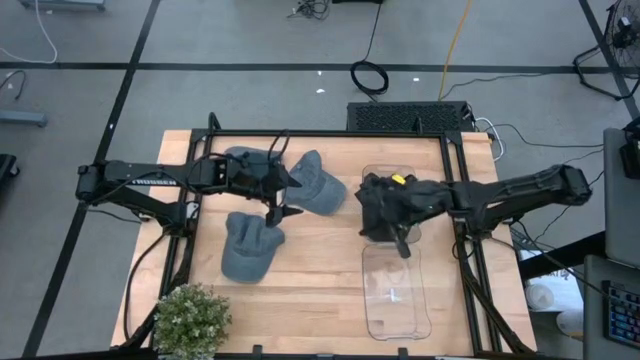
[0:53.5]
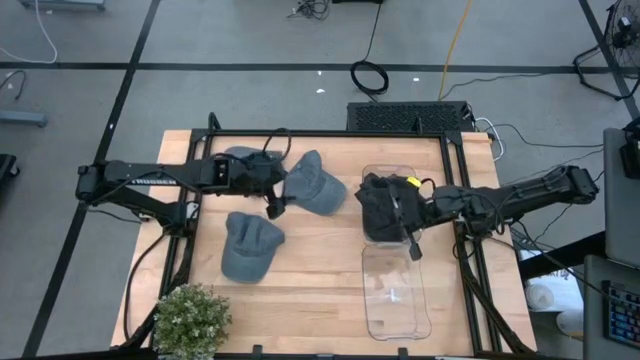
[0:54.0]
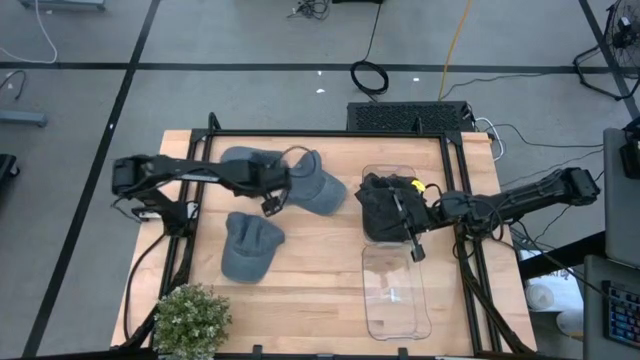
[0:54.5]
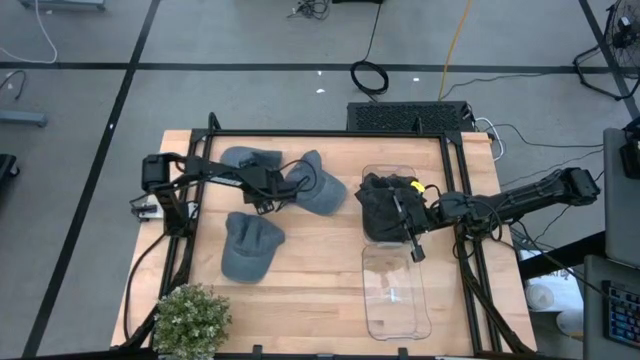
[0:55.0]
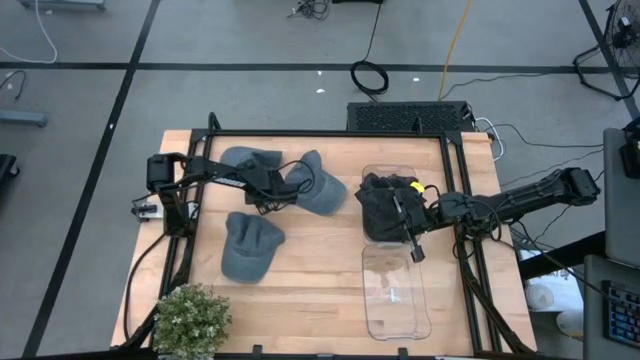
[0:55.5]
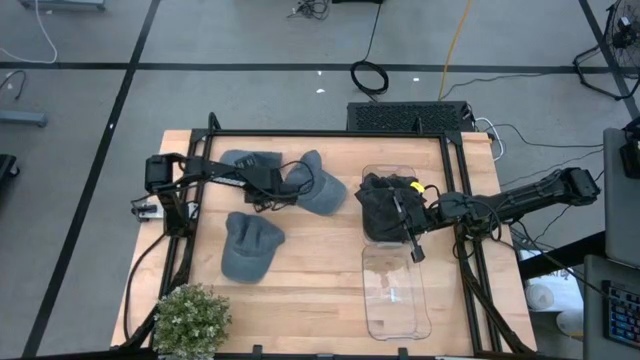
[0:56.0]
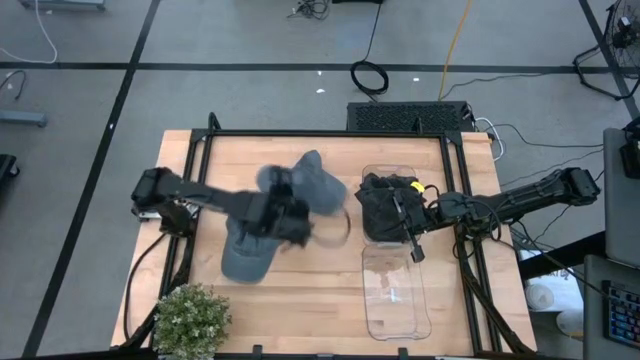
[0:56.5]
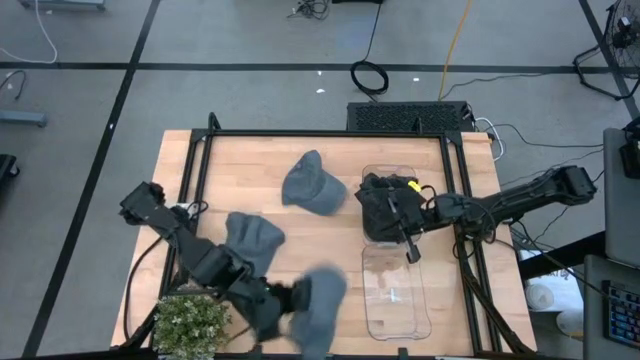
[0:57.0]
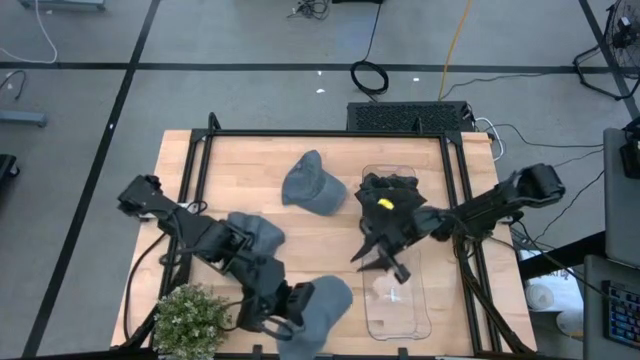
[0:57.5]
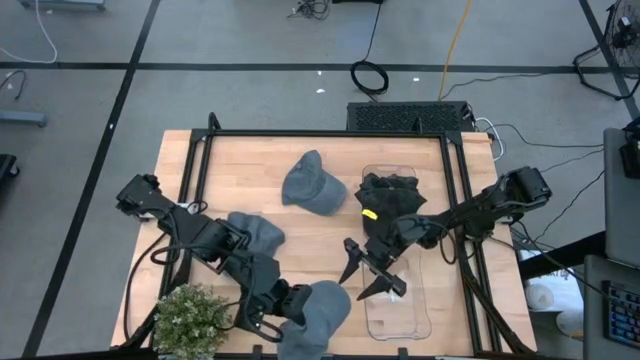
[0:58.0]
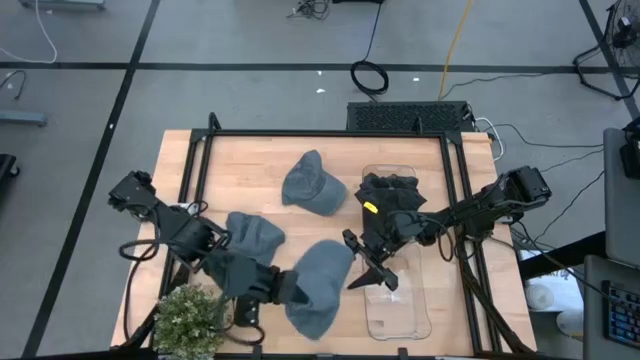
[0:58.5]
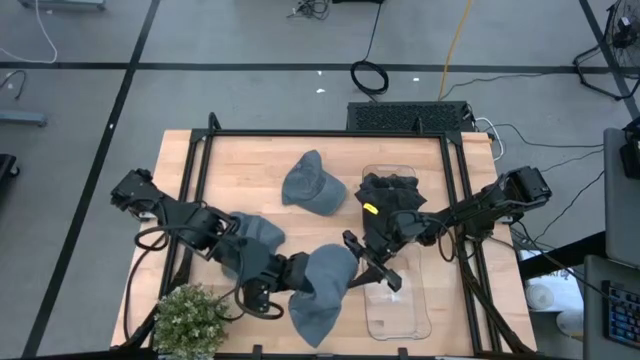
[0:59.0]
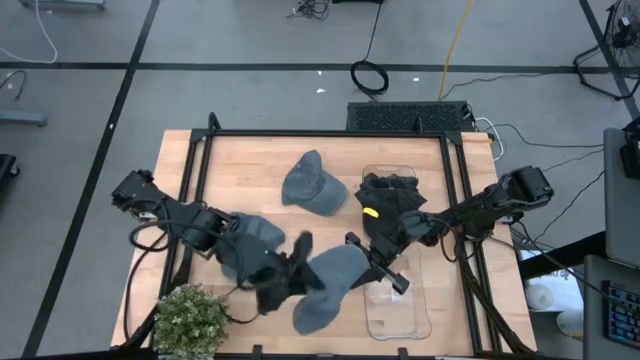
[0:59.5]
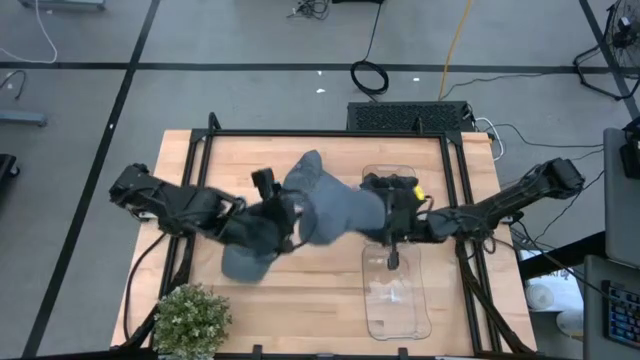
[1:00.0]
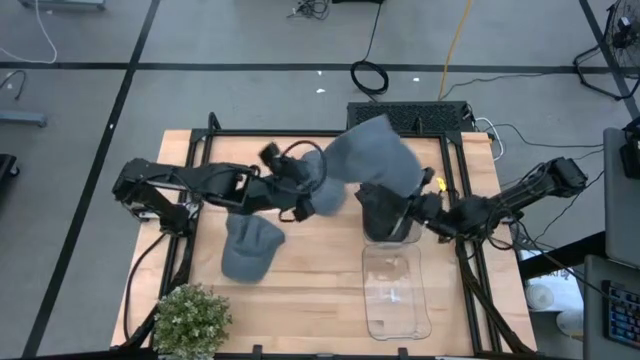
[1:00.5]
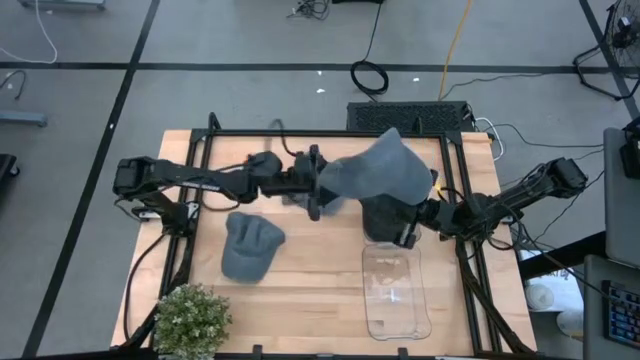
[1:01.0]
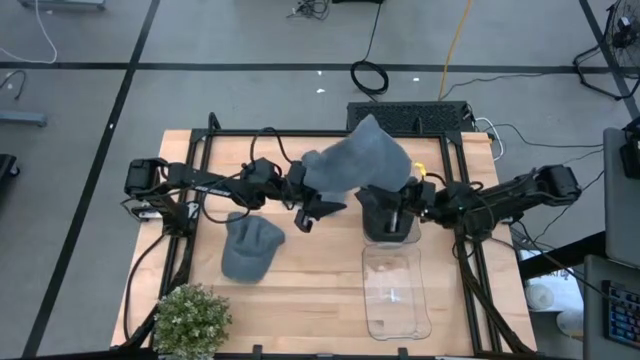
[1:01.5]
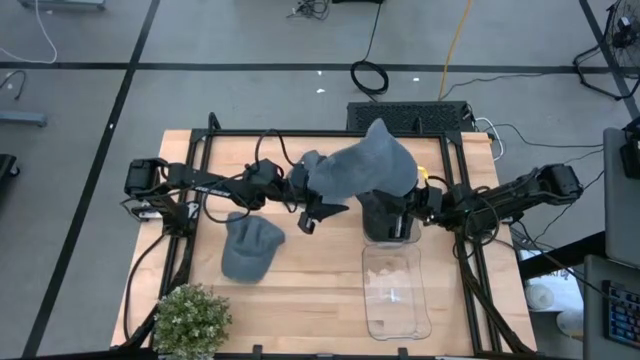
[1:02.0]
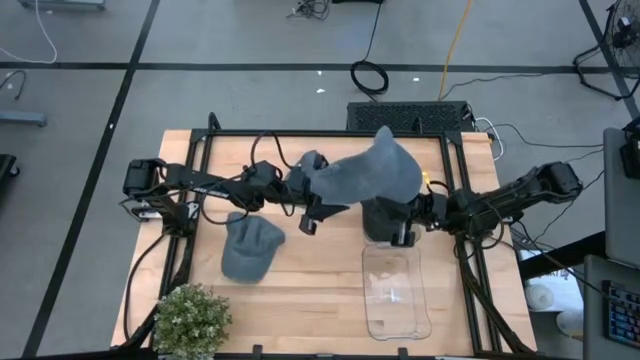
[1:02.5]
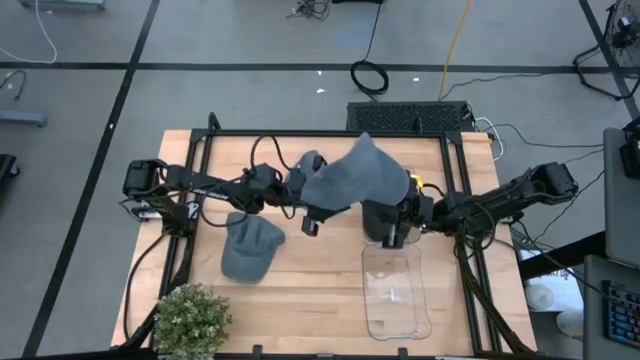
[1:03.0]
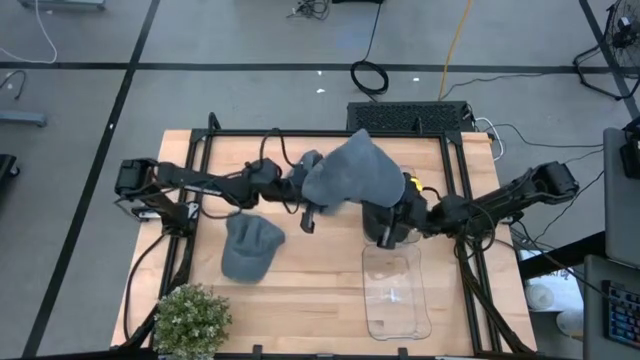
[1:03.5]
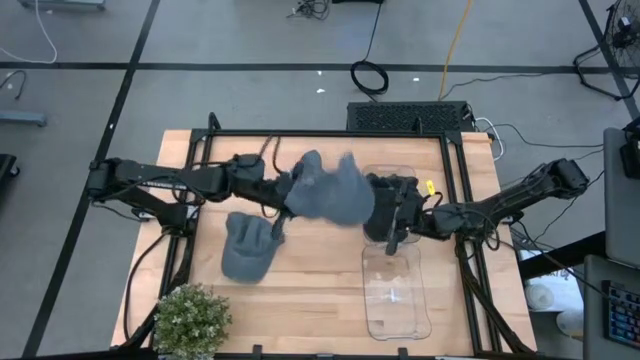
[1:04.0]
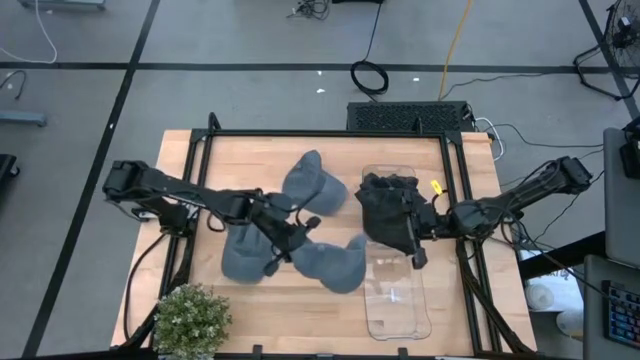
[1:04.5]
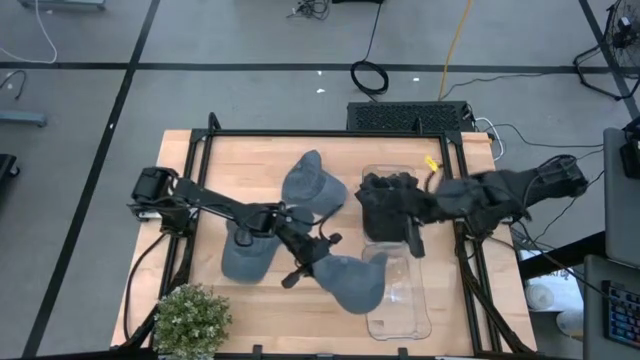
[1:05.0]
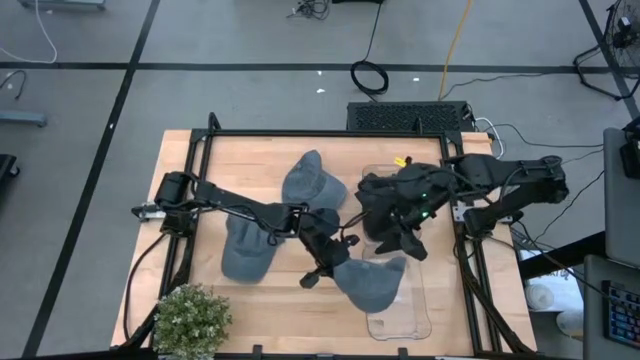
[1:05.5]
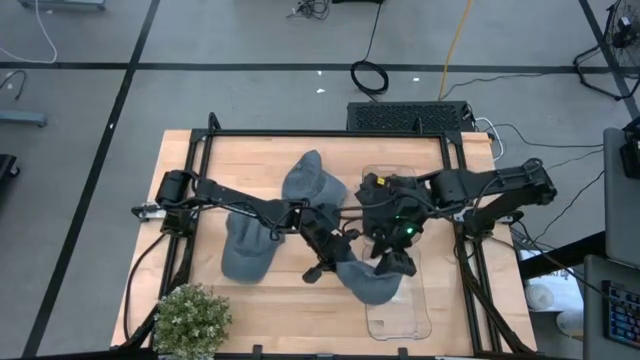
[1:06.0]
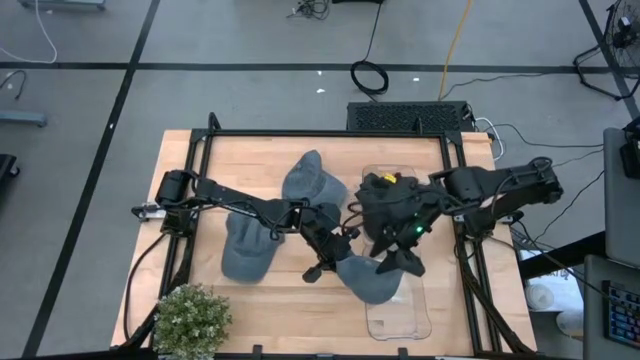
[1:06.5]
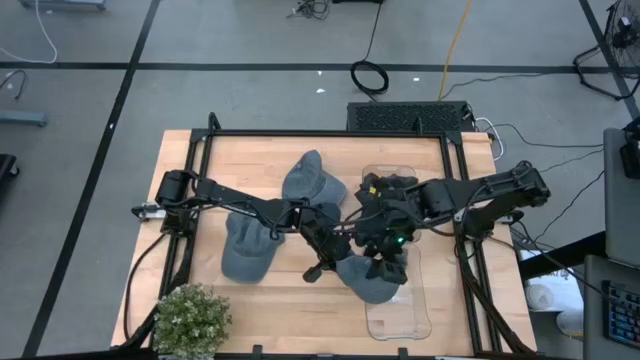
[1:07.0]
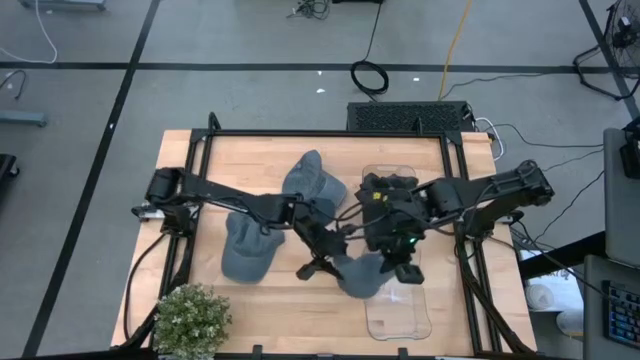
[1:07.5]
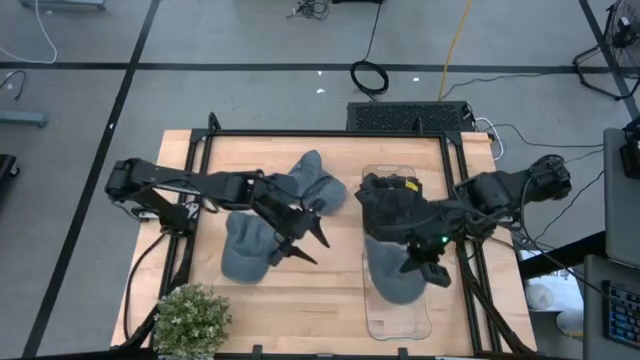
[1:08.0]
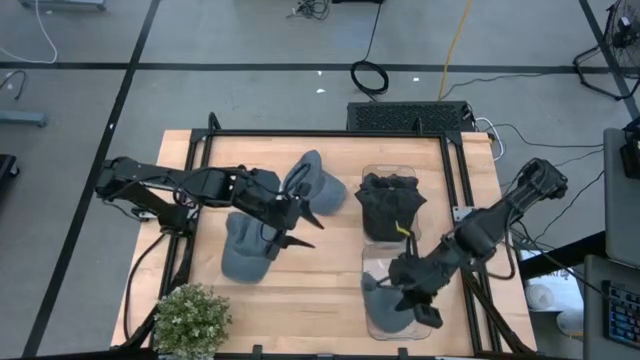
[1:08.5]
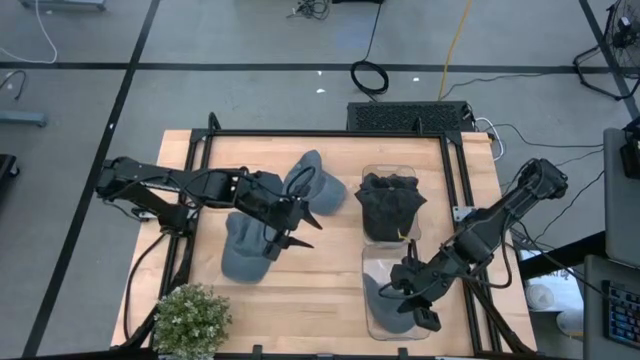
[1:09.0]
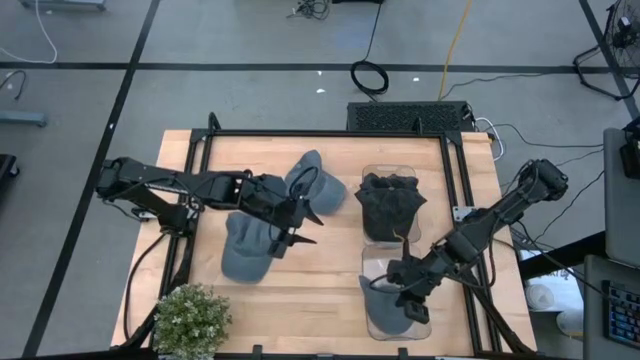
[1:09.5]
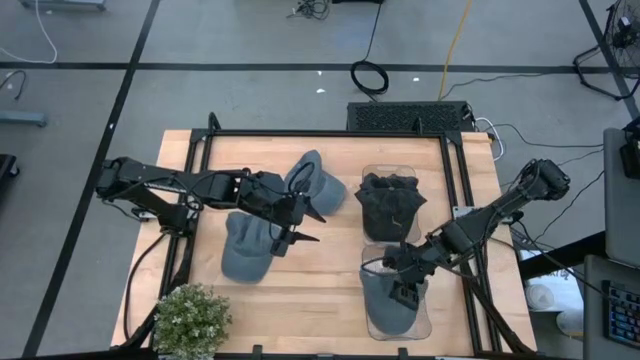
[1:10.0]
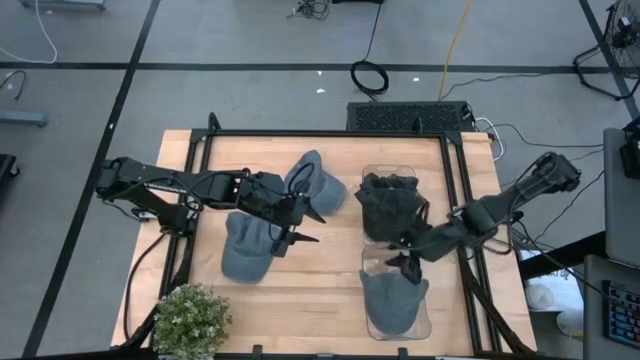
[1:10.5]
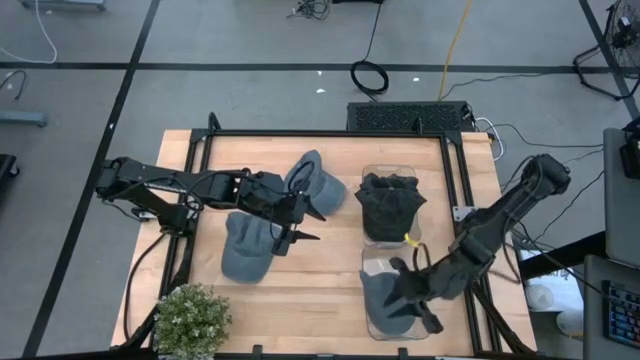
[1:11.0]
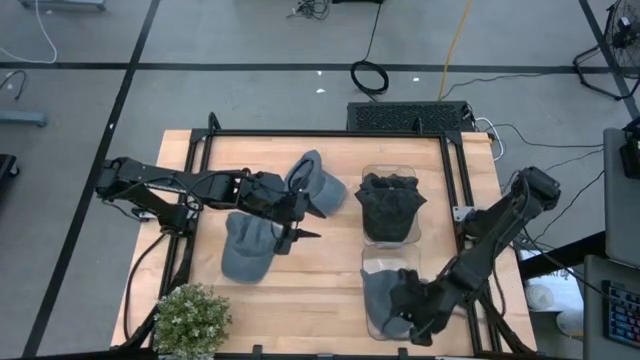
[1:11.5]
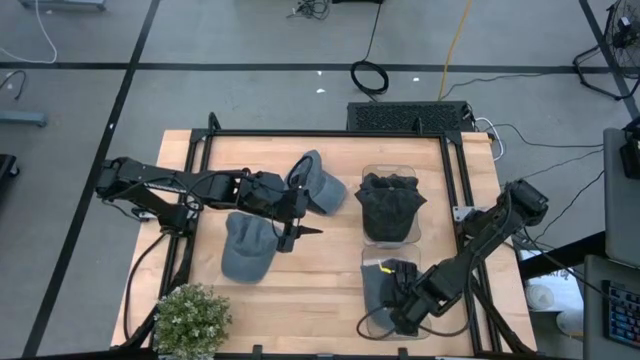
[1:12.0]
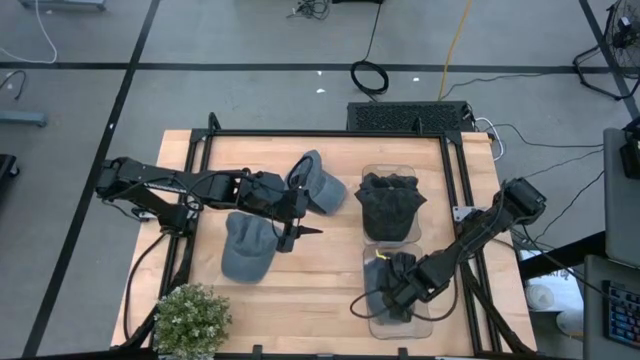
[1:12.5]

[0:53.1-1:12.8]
Task: Pick & Place hat
Put the left blue cap into the bottom transparent bin

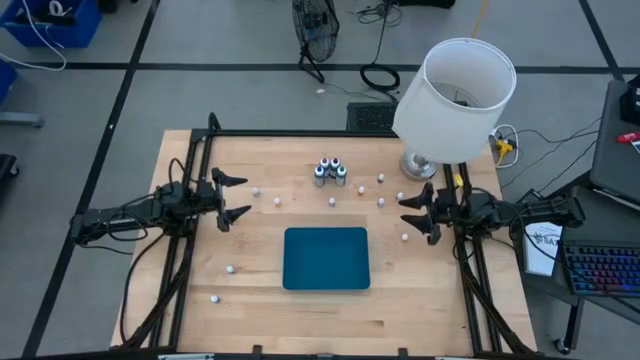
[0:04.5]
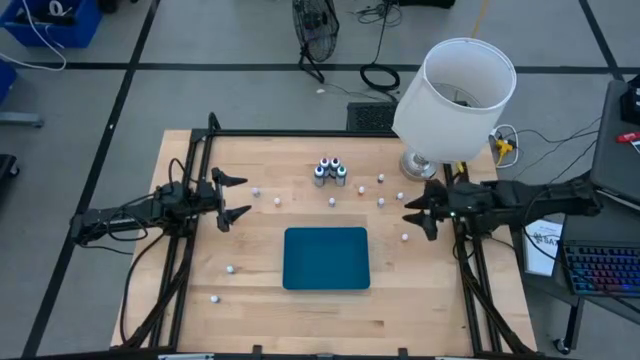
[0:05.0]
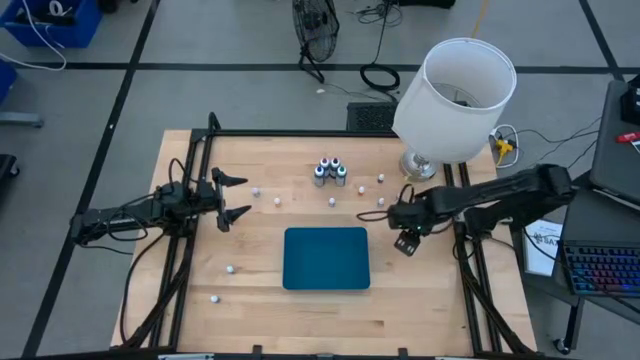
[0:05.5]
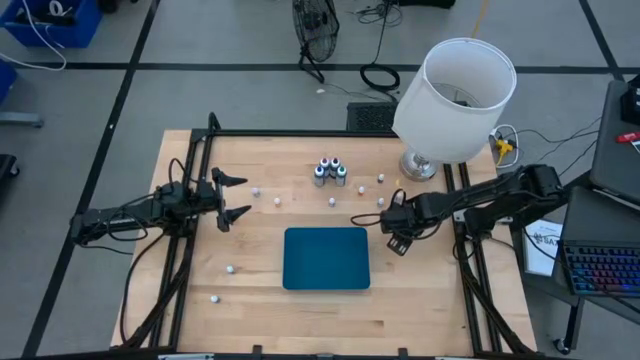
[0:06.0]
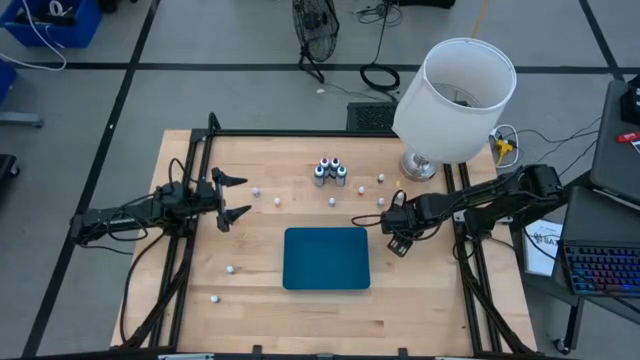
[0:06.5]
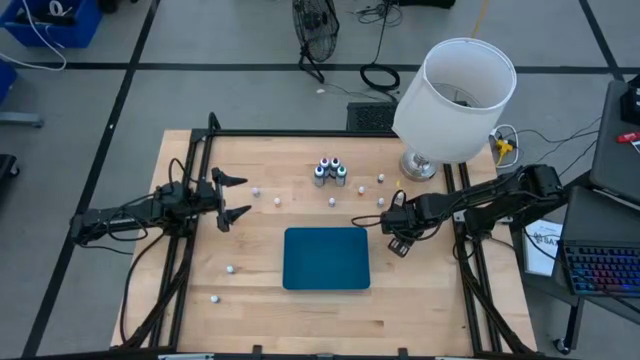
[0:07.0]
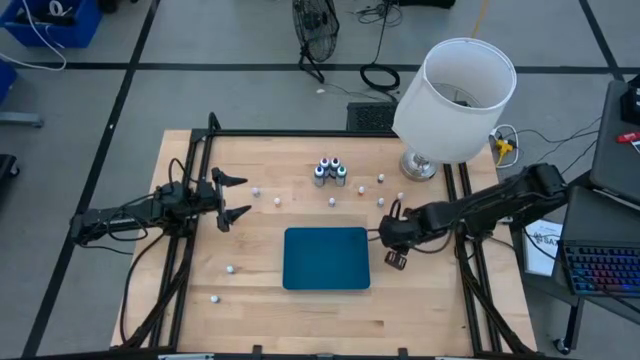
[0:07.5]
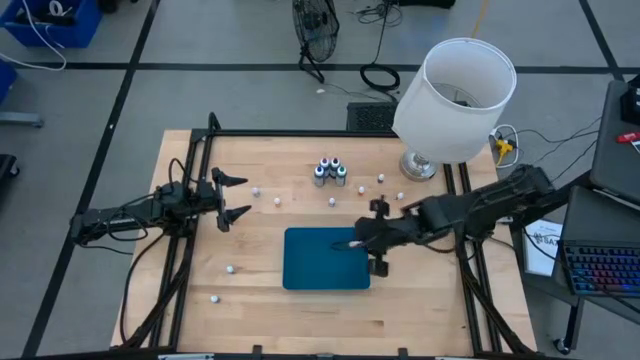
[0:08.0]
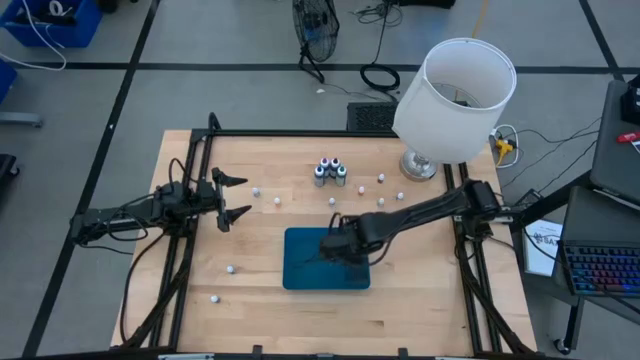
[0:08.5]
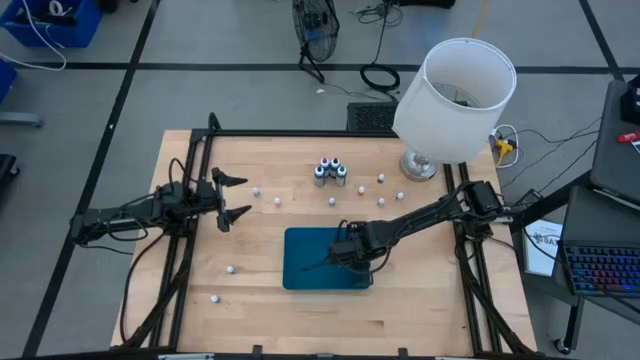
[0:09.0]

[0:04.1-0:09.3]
Task: Pick & Place food coloring
Put the yellow food coloring bottle into the bin
